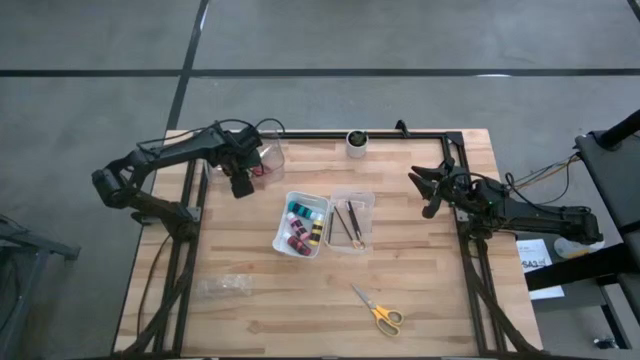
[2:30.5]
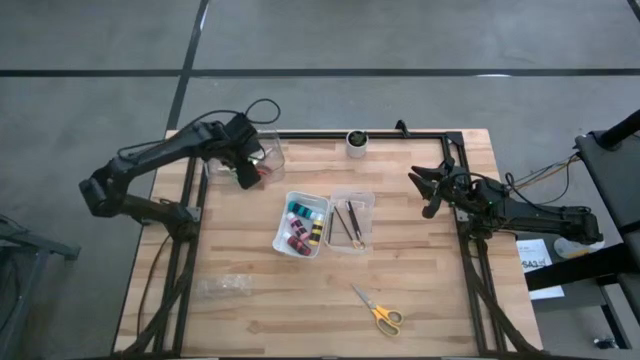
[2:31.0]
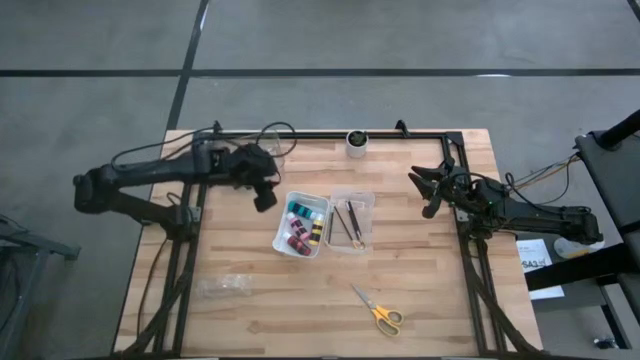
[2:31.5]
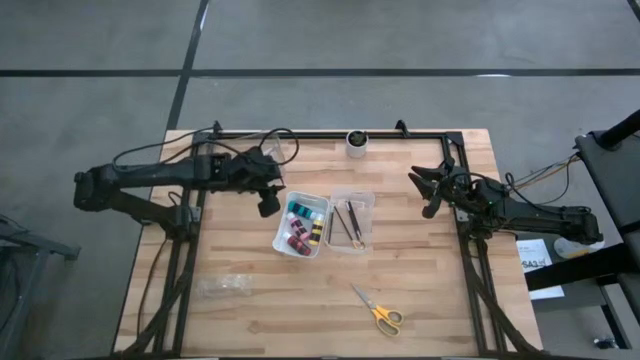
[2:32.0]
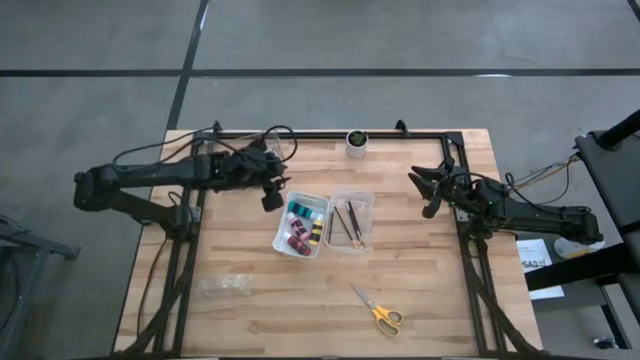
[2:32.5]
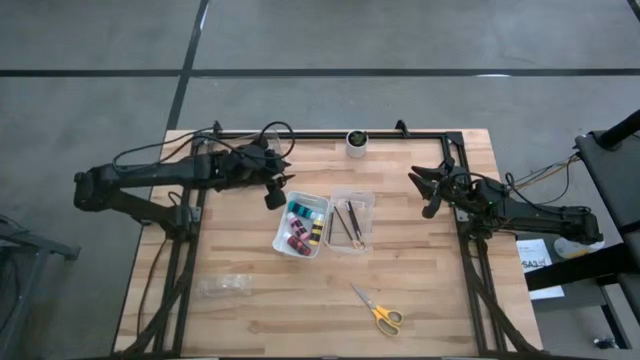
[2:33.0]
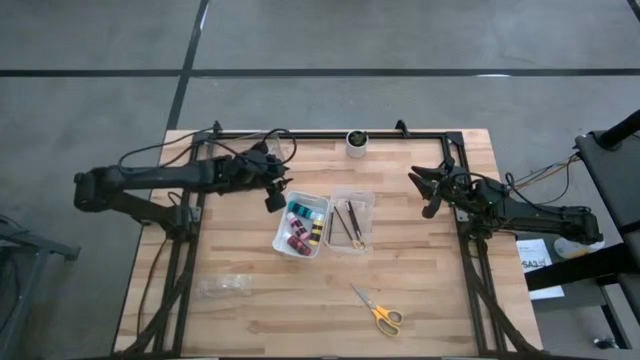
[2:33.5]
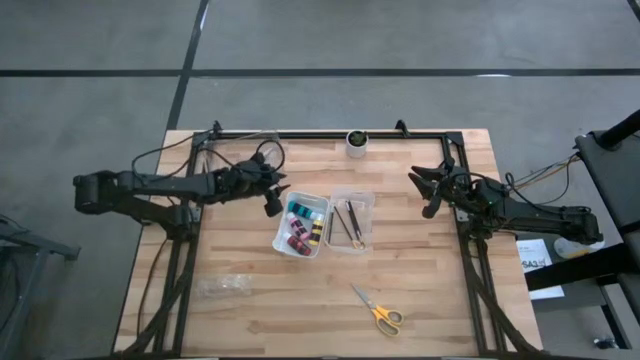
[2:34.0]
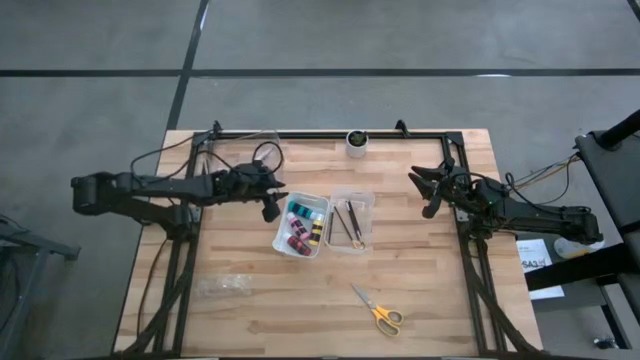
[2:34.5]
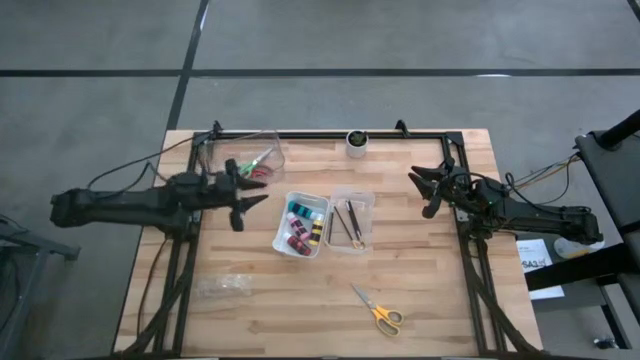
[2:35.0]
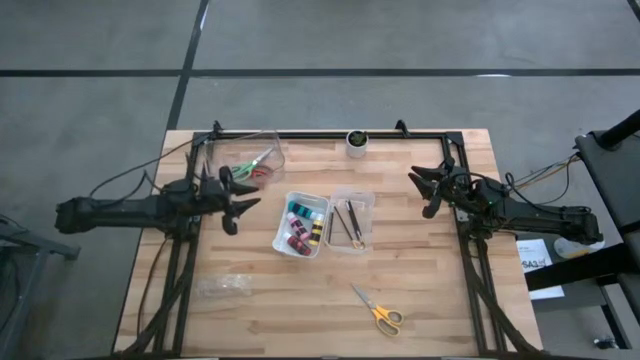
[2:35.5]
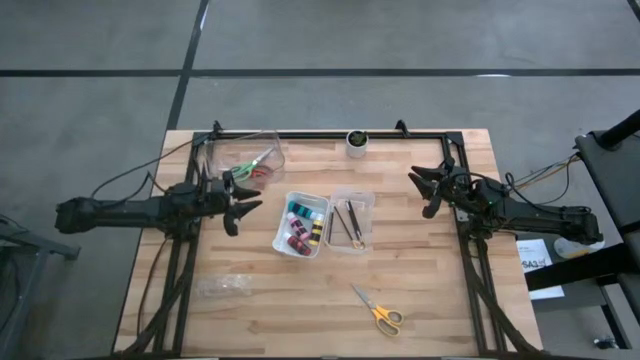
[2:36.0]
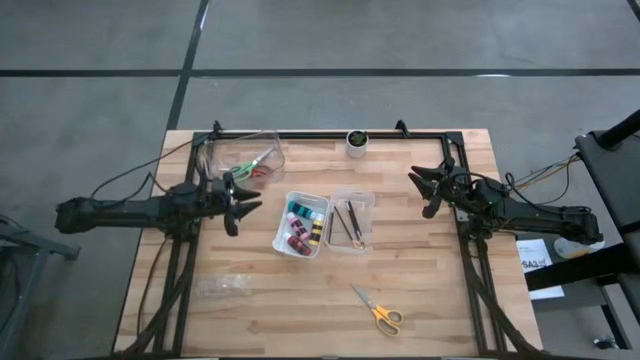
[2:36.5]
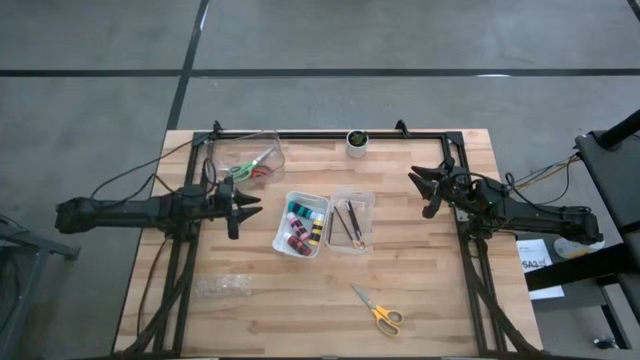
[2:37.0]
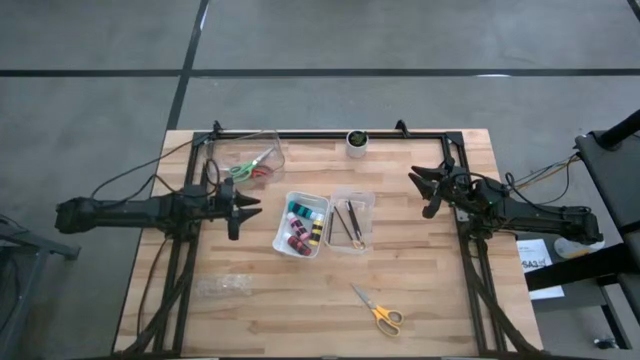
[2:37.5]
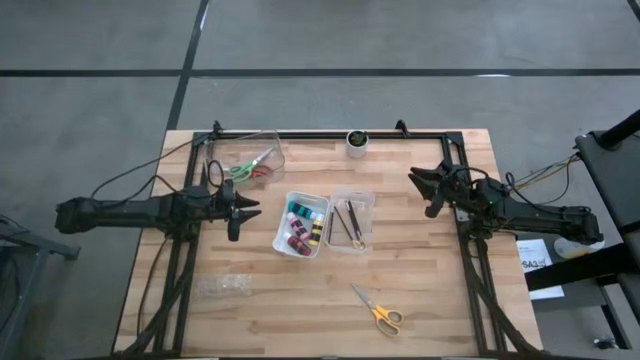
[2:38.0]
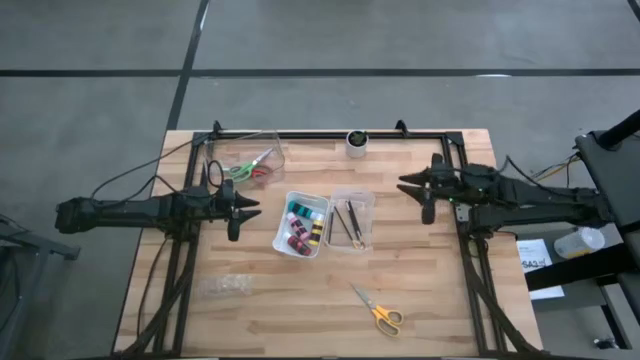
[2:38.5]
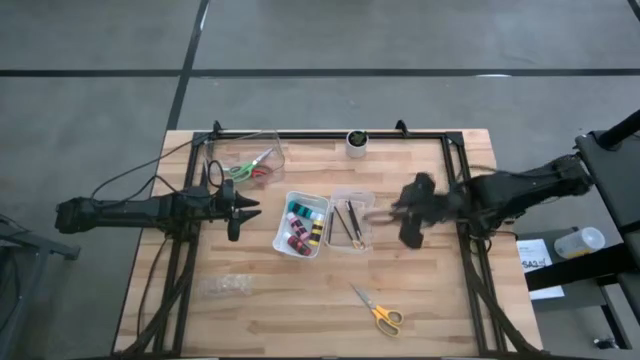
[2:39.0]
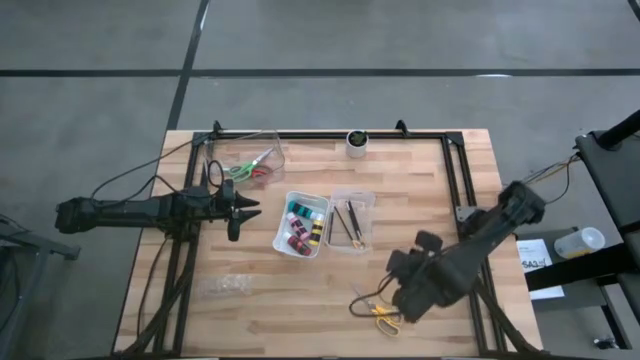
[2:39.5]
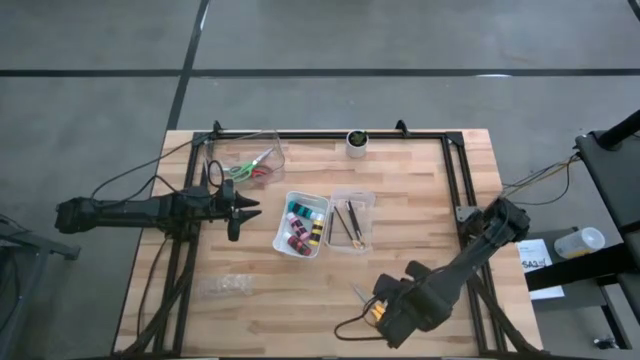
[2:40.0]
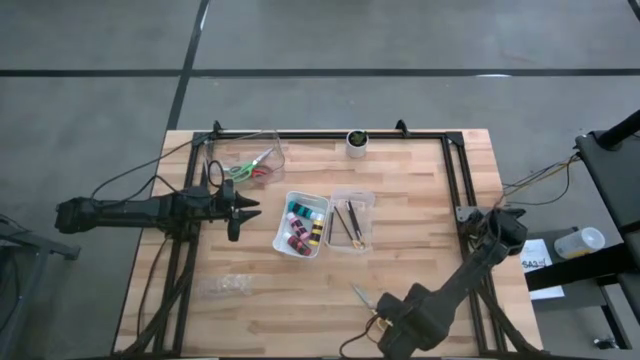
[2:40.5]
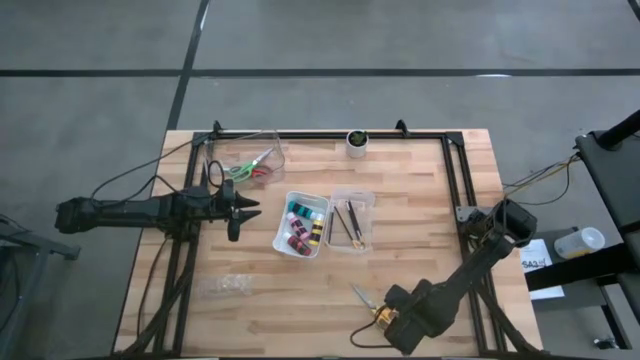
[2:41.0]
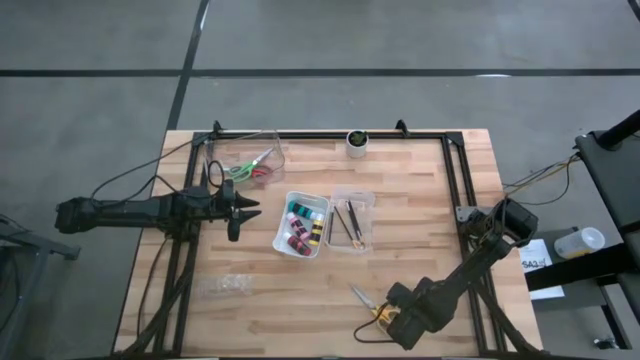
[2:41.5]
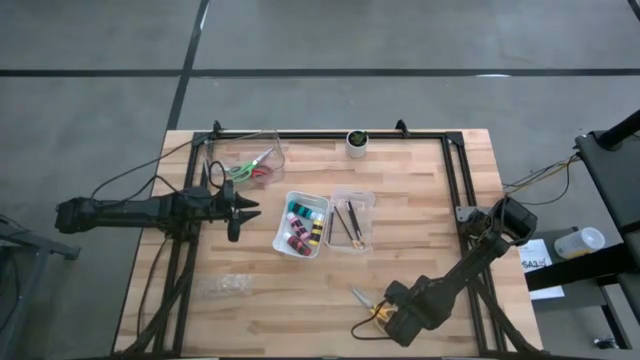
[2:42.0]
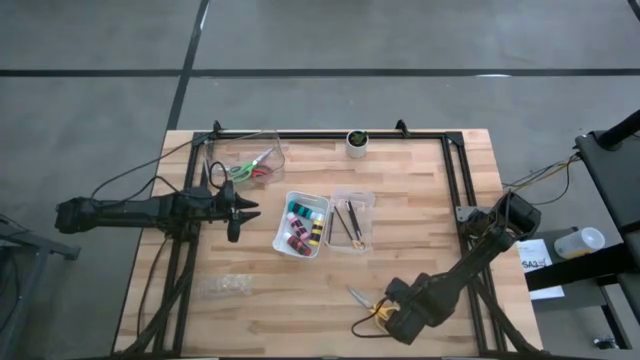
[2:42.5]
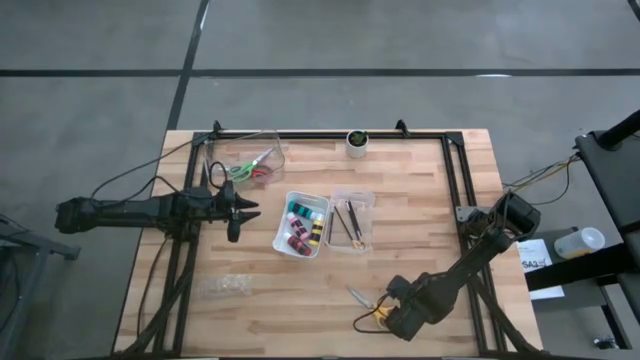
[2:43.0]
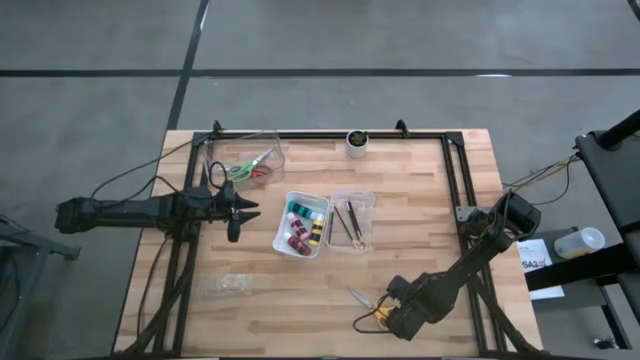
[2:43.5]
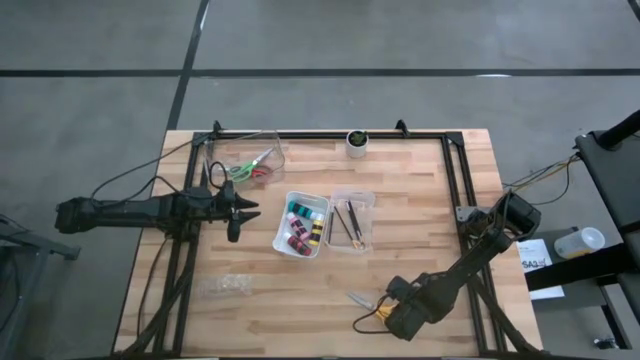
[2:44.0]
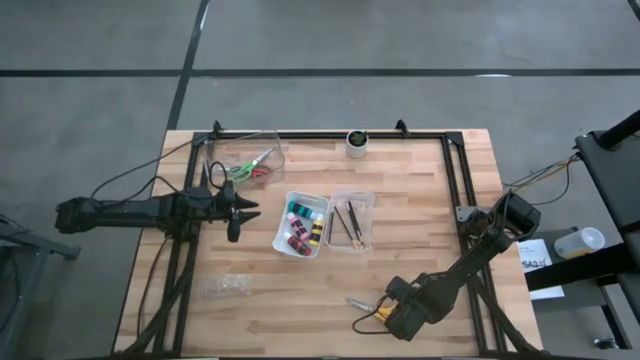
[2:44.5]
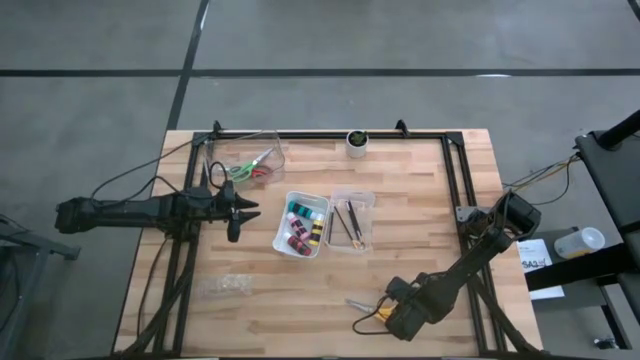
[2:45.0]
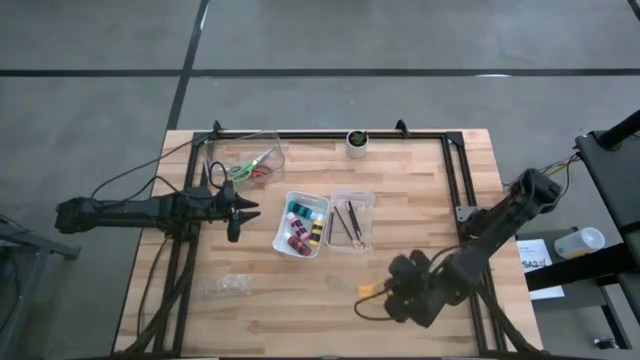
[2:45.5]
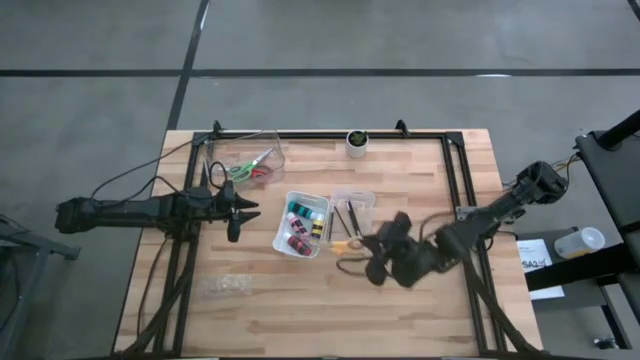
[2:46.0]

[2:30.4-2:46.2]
Task: Pick & Place Paint Supplies
Put the yellow scissors into the top transparent bin

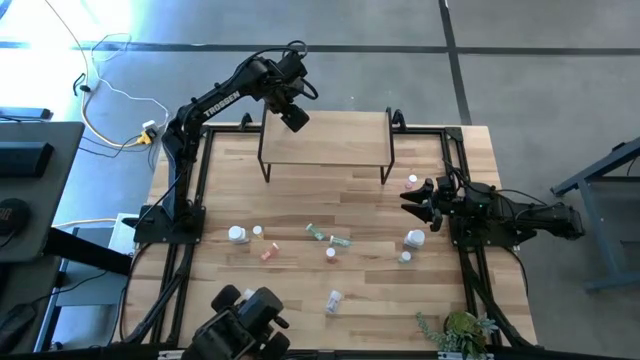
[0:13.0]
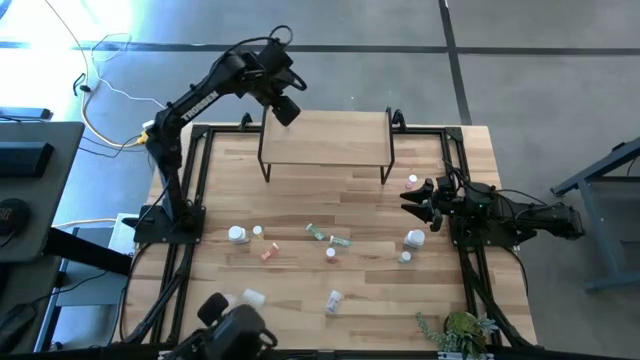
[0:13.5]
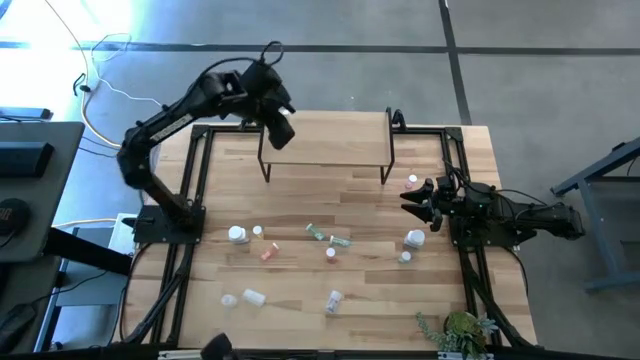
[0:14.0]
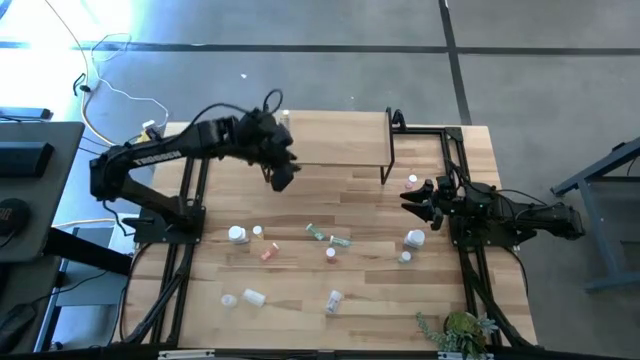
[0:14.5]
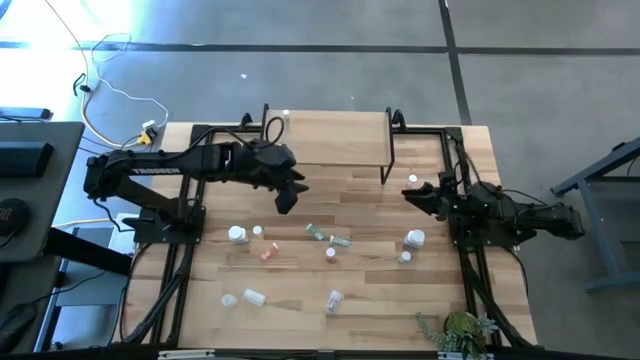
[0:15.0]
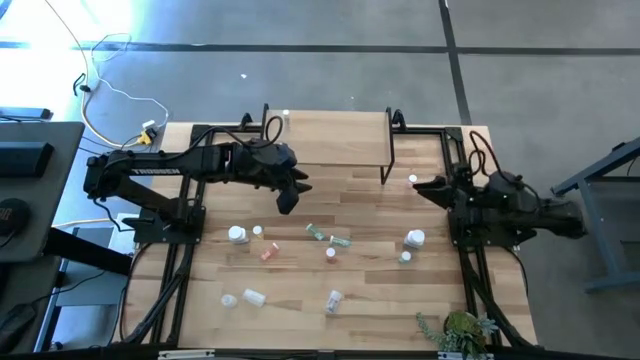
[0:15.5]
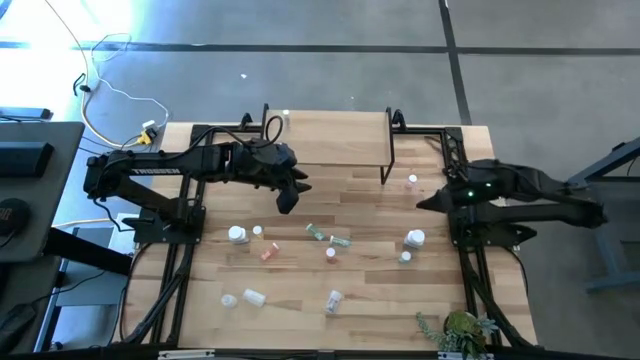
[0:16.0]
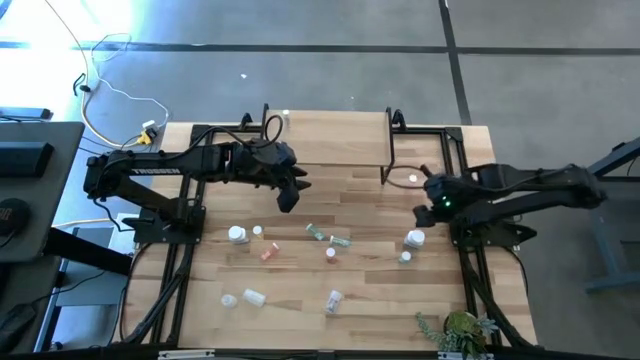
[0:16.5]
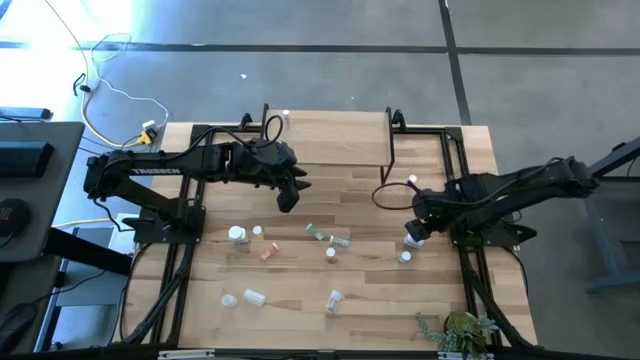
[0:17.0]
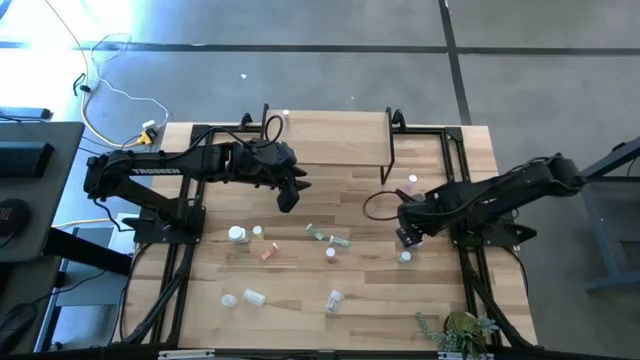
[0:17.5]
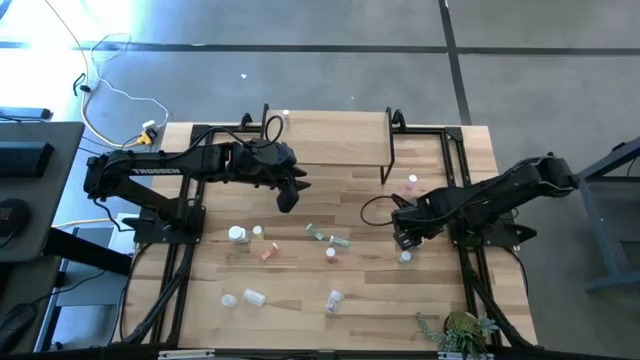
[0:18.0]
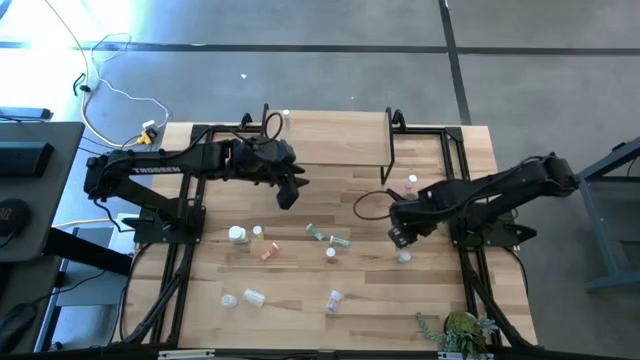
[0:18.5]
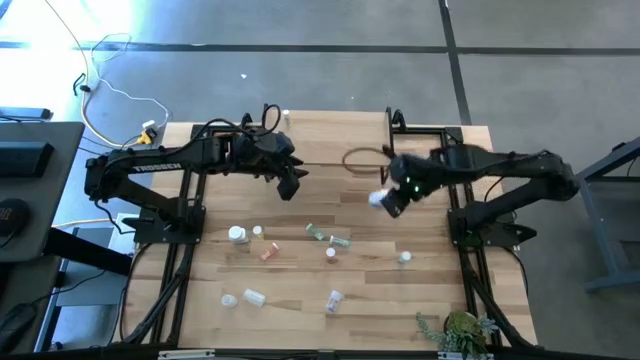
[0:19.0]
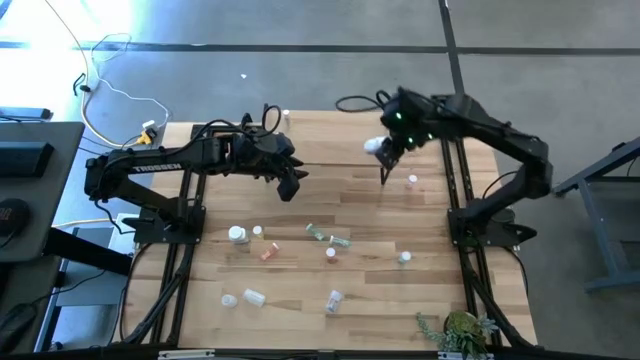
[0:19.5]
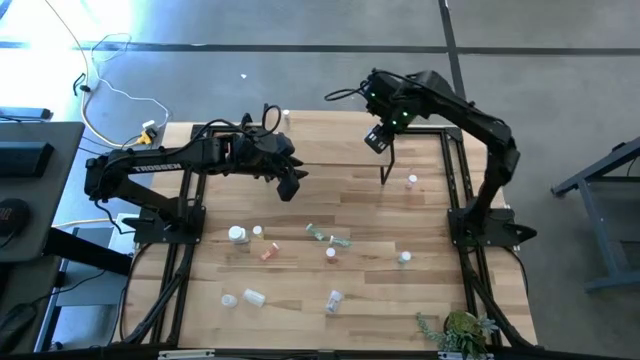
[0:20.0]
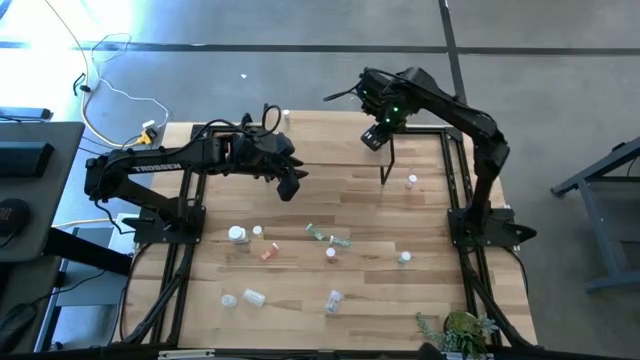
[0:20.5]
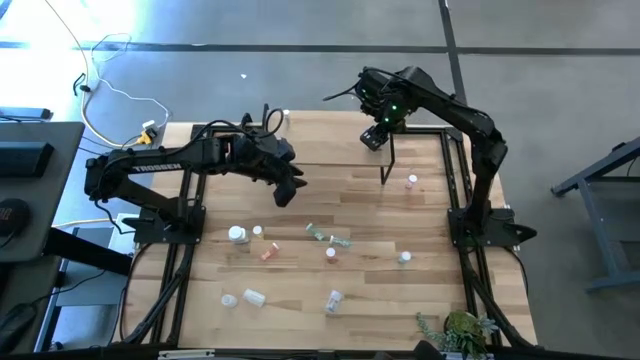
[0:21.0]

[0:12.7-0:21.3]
Task: Pick and place medicine bottles onto shelf by color
Put the white pill bottle on the shelf
